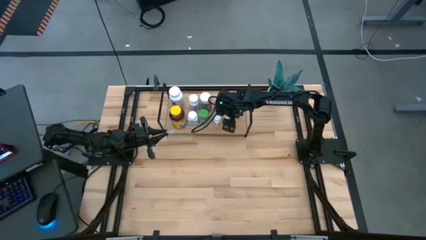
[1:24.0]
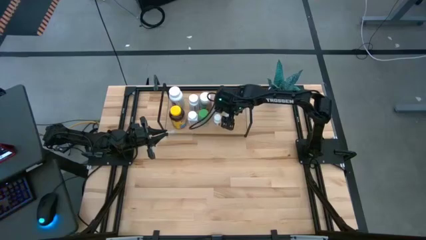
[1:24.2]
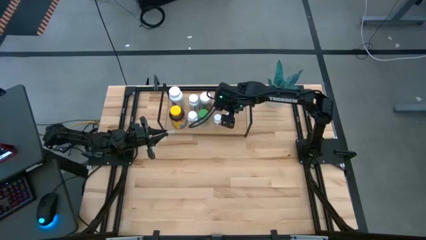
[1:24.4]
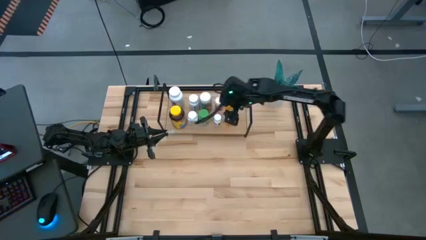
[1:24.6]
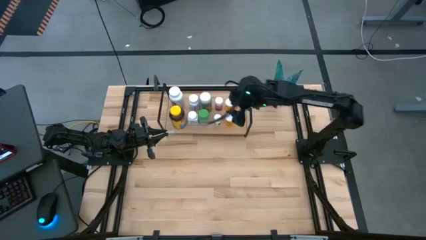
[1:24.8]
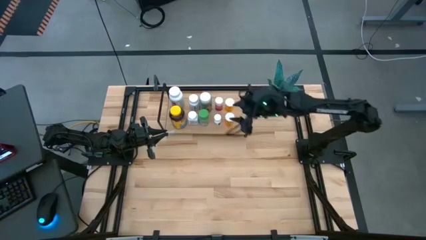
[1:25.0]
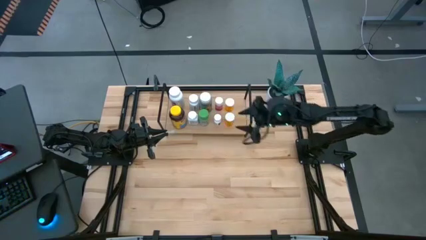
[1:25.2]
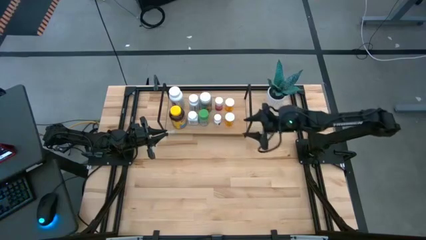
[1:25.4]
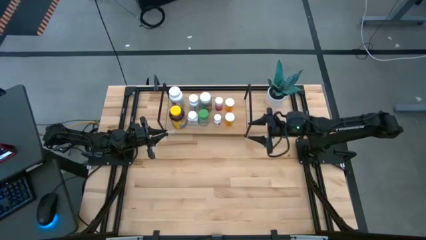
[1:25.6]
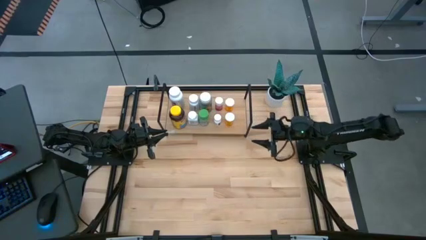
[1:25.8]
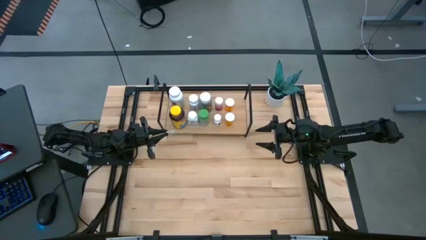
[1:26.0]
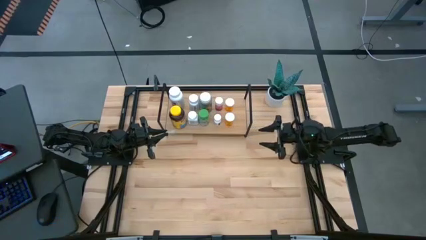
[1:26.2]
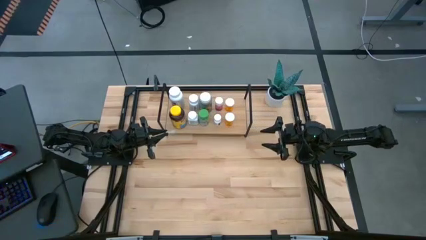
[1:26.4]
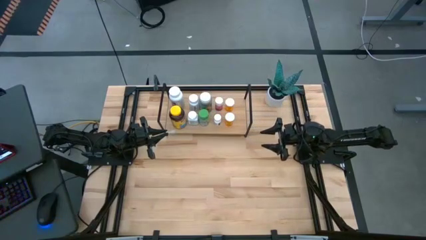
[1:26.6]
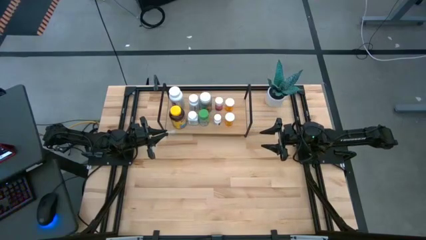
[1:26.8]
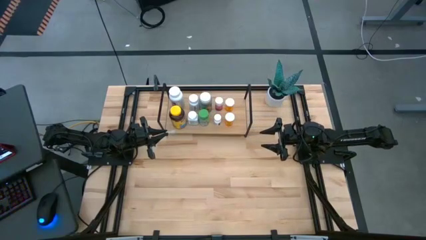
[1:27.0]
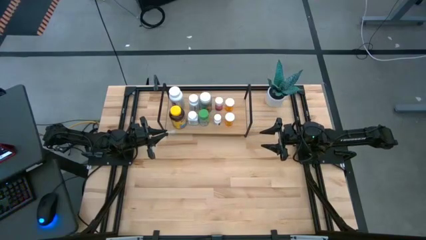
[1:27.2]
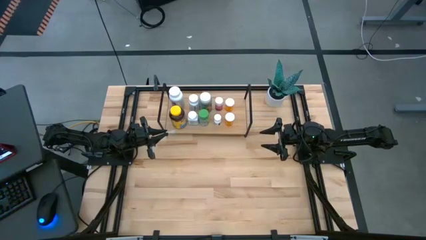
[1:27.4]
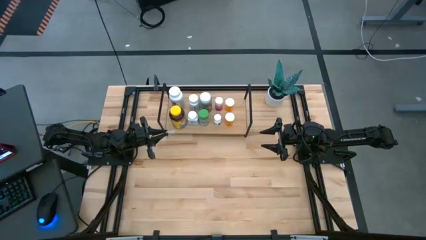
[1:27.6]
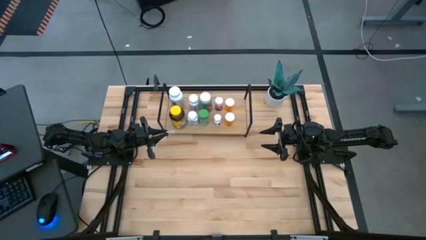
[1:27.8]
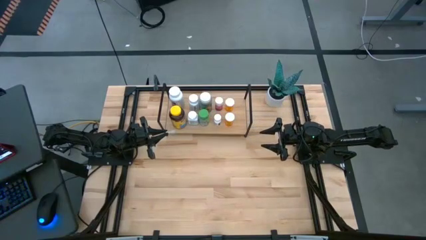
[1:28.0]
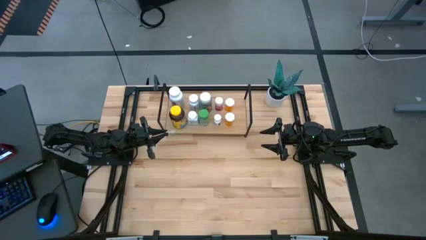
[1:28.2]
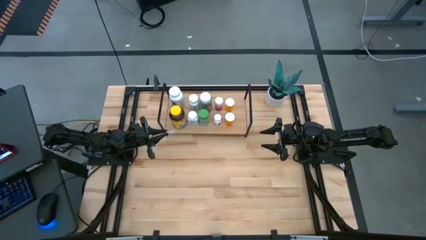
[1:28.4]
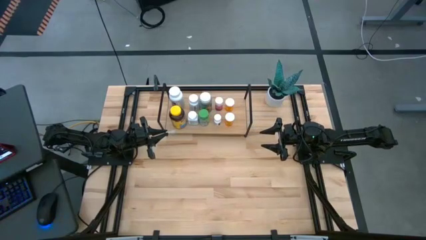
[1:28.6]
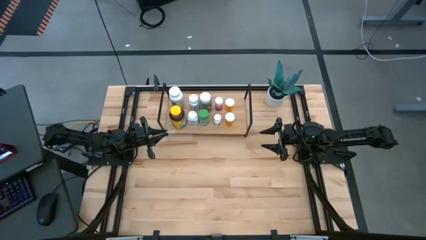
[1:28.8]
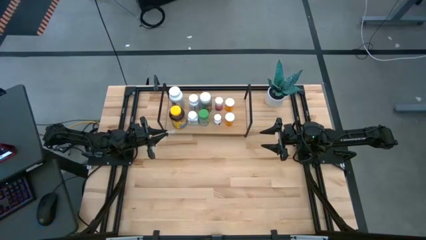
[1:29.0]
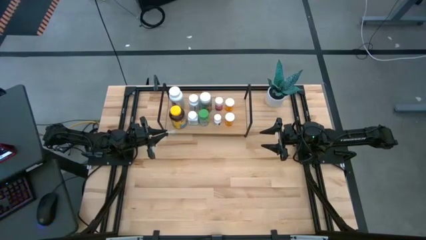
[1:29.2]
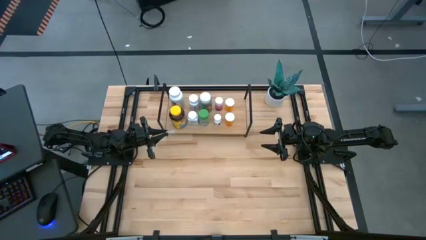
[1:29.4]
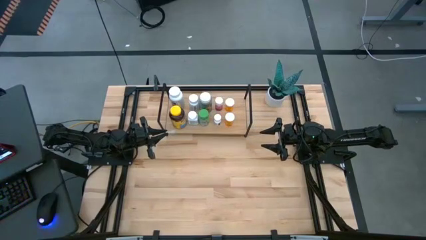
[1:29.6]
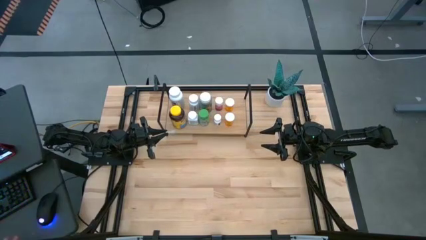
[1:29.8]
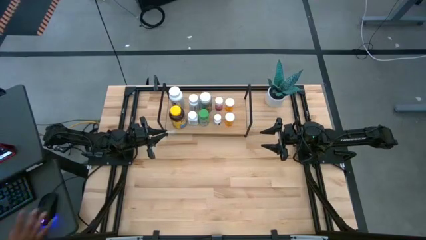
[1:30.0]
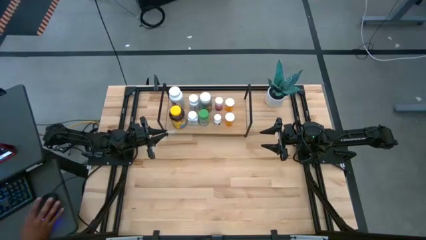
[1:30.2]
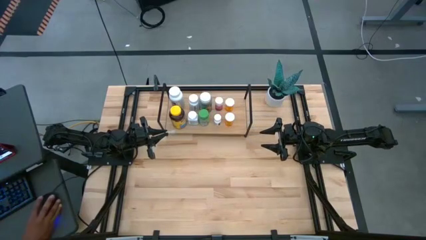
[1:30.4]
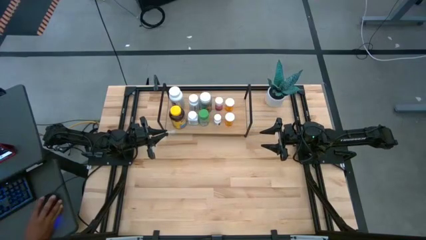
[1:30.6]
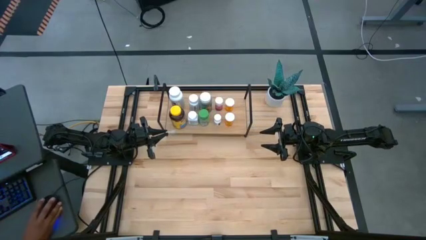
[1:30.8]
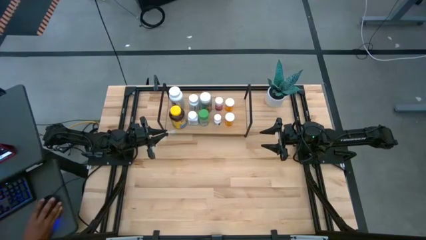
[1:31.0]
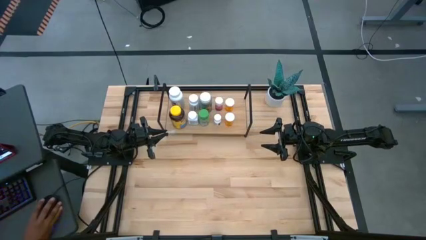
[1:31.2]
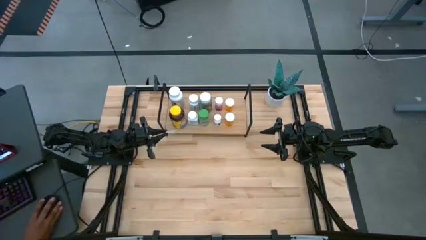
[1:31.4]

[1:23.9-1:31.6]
Task: Pick and place medicine bottles onto shelf by color
Return to Home Position

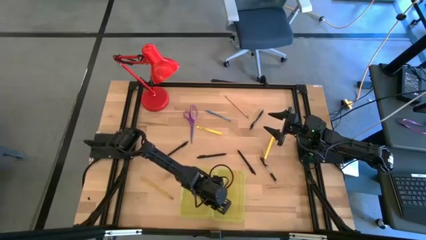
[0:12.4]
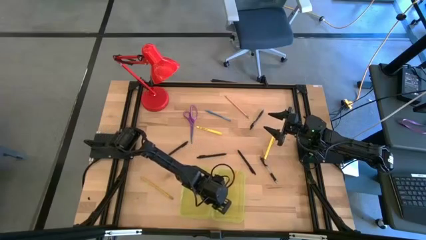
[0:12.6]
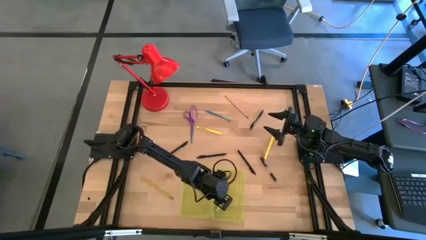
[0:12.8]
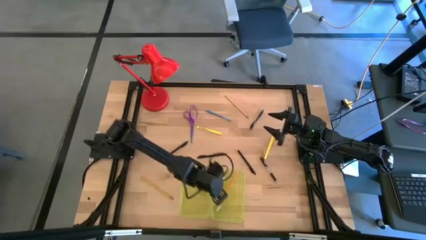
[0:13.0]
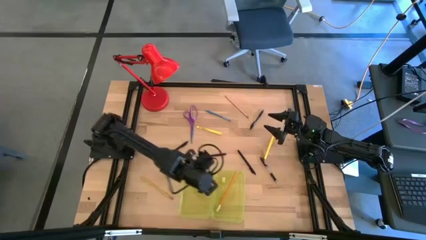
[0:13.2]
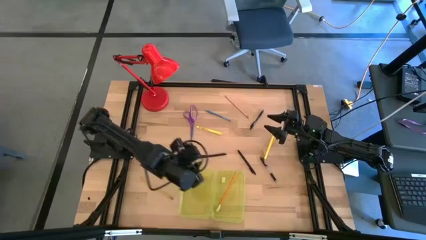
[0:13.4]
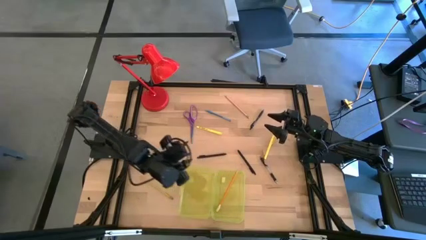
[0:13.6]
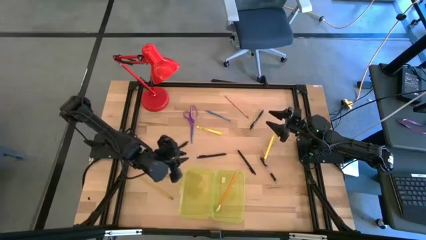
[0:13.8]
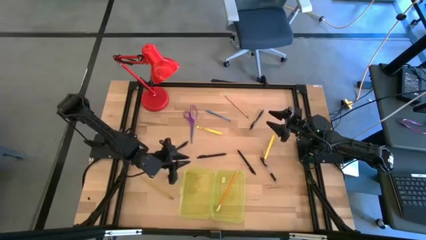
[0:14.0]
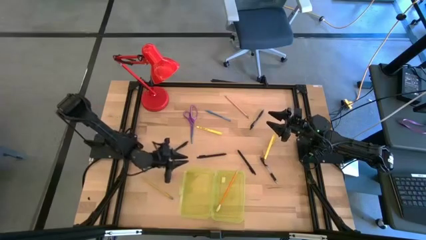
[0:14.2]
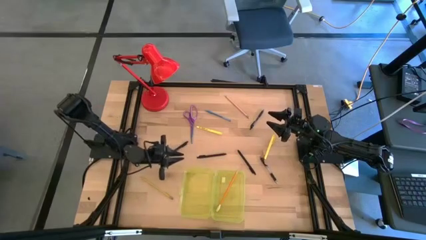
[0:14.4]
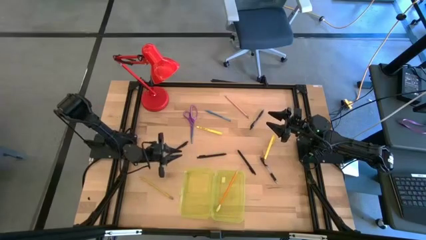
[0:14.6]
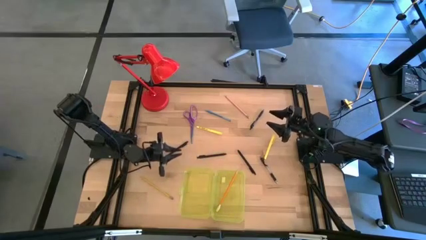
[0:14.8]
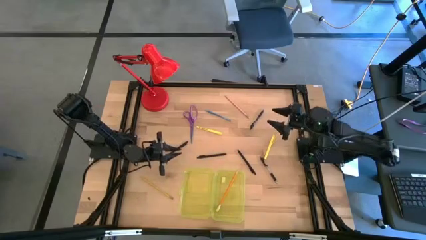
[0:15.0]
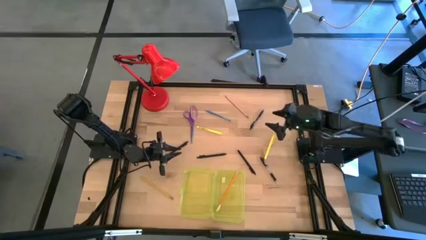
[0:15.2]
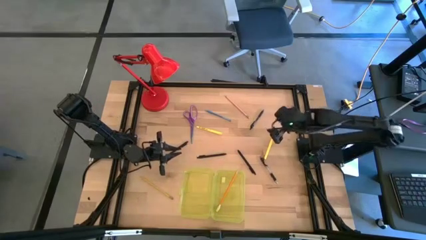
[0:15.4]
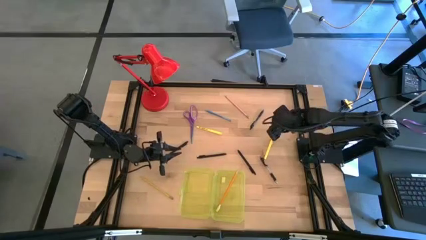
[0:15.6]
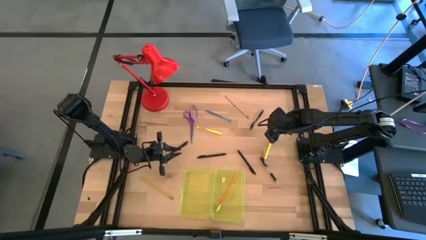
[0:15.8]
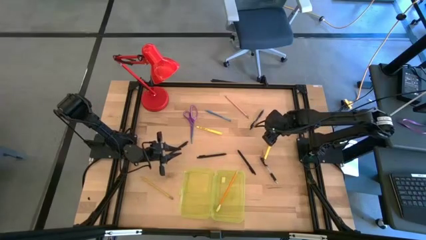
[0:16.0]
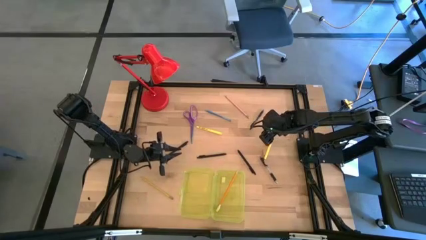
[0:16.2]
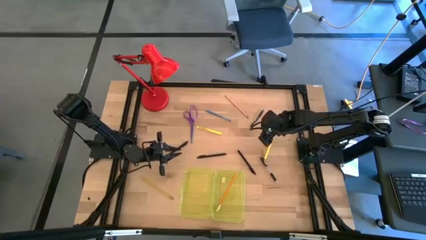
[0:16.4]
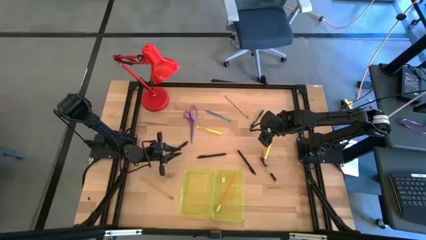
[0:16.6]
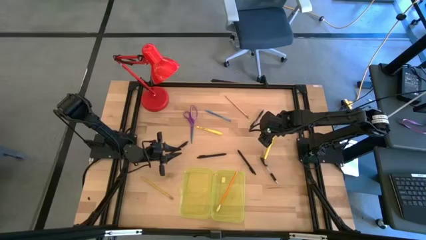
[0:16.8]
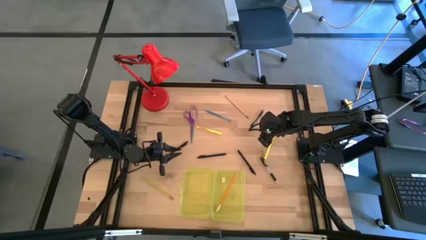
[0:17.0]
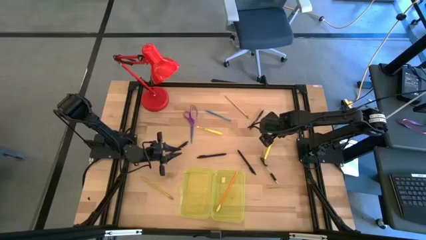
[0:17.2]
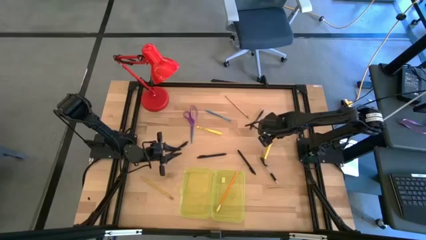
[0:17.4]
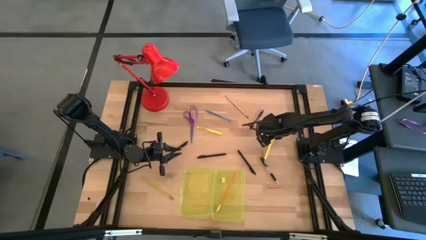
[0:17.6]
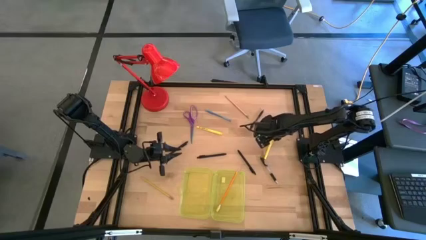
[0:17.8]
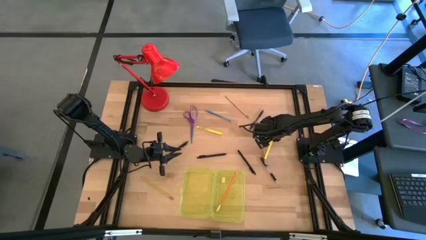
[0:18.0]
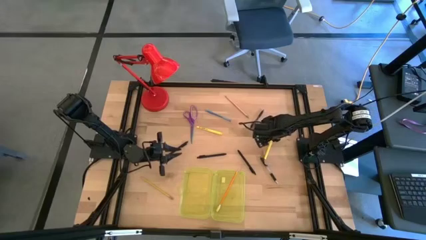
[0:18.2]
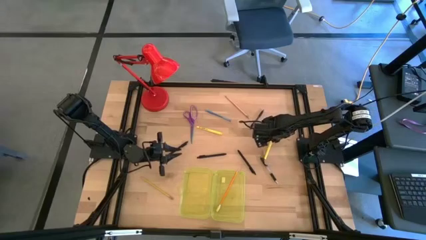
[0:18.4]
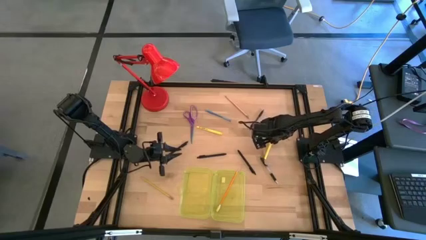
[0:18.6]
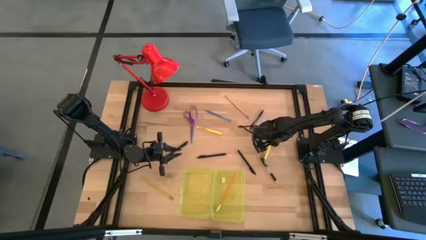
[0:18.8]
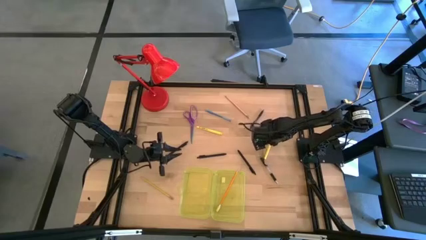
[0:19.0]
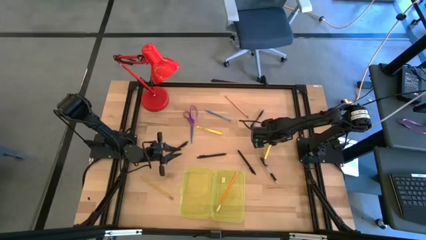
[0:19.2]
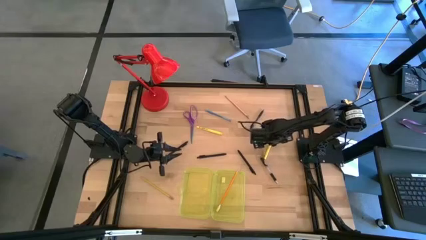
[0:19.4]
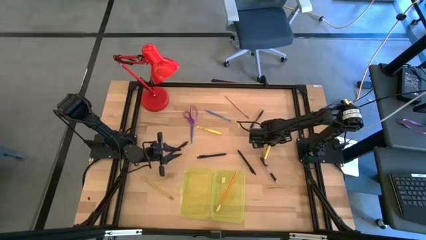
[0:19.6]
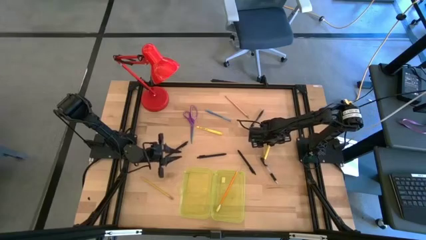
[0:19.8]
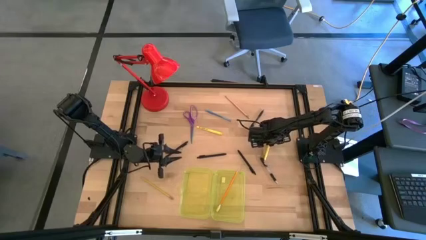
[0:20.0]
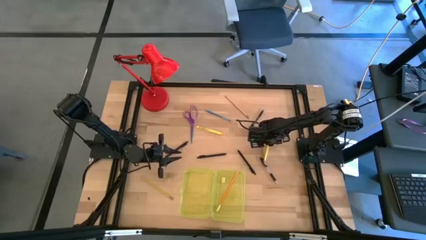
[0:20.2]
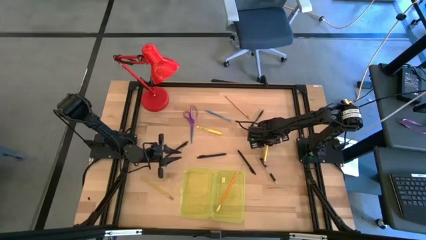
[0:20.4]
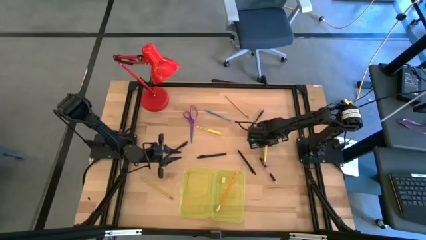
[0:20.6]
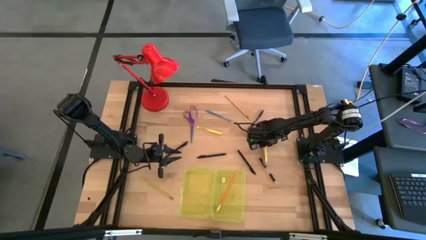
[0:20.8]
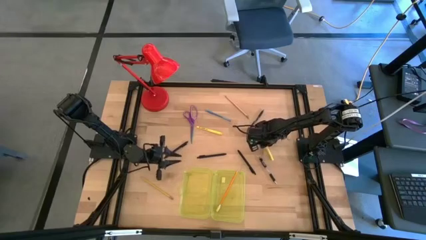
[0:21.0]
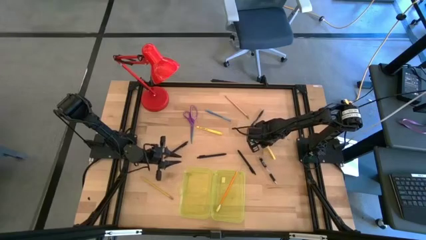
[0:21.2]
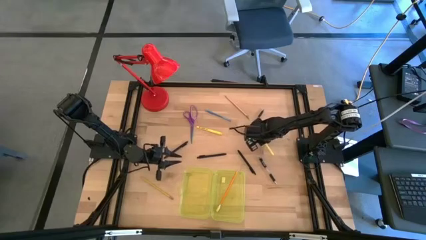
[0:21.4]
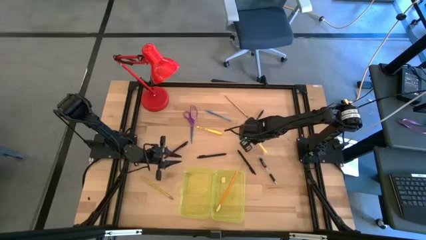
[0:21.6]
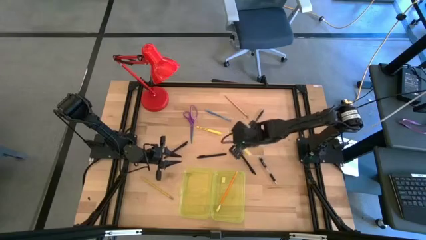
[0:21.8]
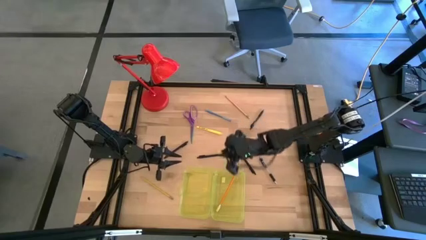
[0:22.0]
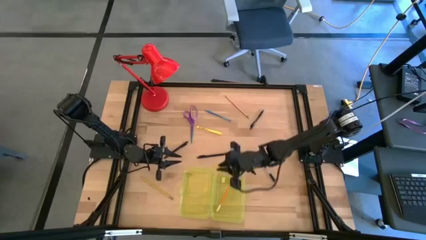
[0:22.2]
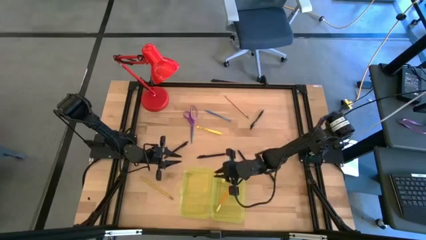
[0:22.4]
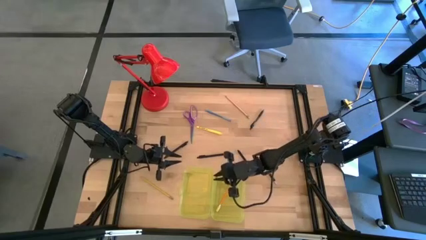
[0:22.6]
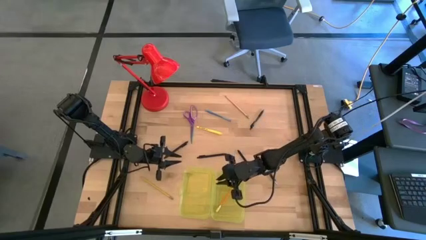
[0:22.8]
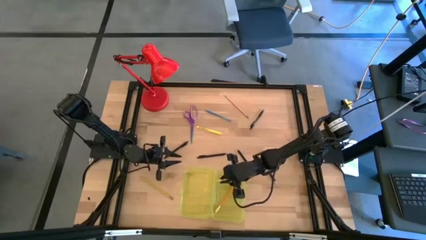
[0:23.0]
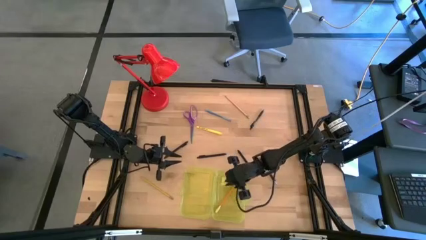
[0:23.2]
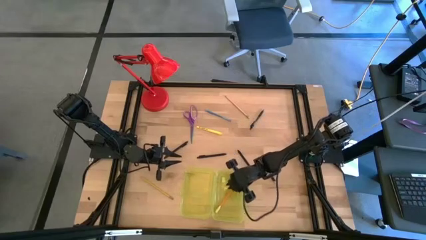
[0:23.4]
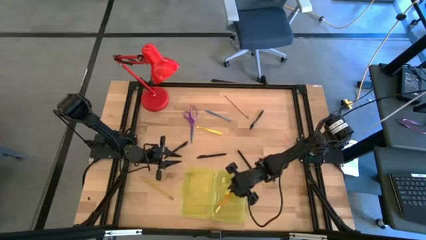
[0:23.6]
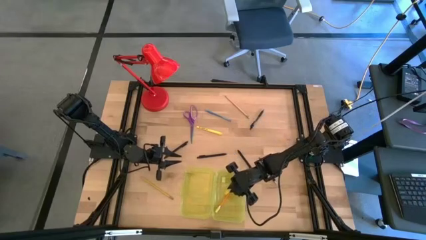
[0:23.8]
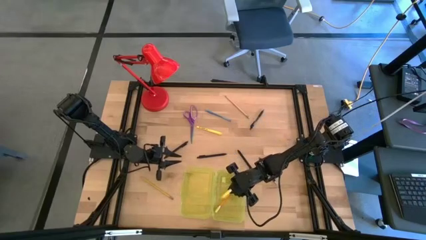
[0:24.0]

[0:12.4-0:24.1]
Task: Pick & place school supplies into a supply box
Put the yellow pen into the yellow supply box
